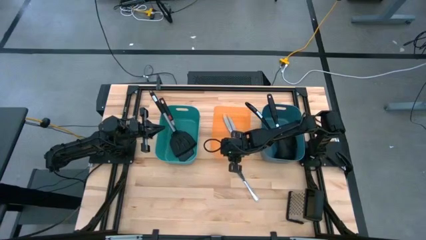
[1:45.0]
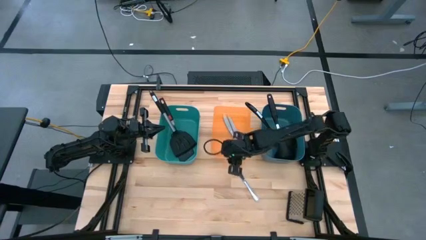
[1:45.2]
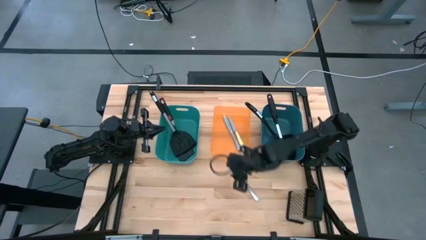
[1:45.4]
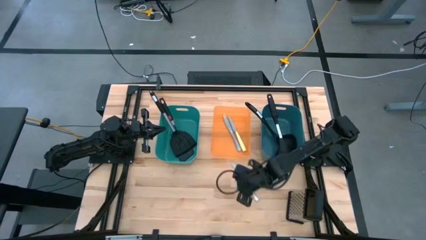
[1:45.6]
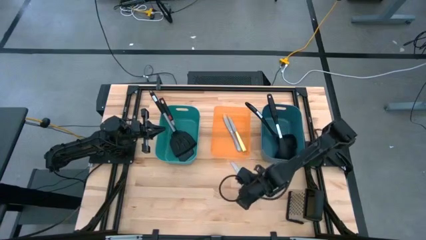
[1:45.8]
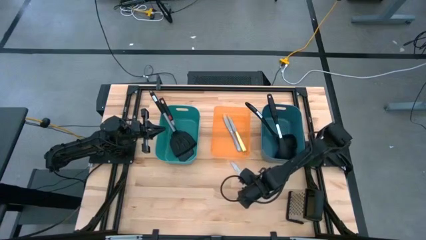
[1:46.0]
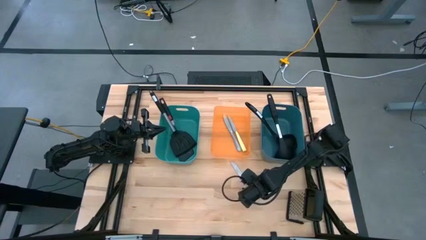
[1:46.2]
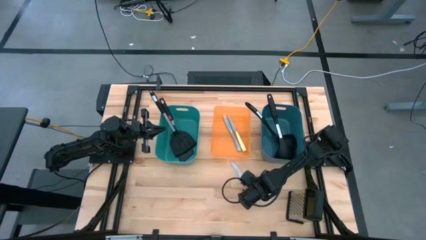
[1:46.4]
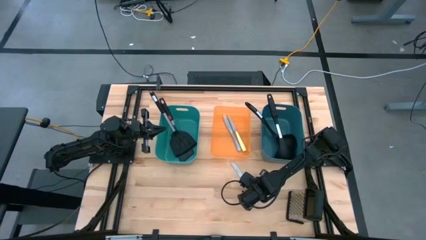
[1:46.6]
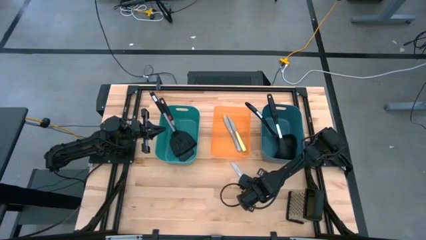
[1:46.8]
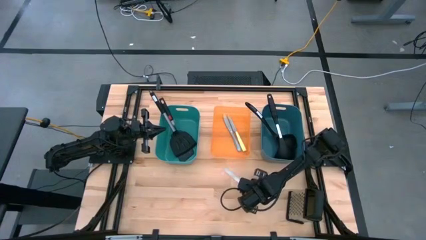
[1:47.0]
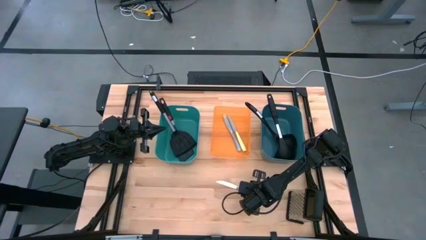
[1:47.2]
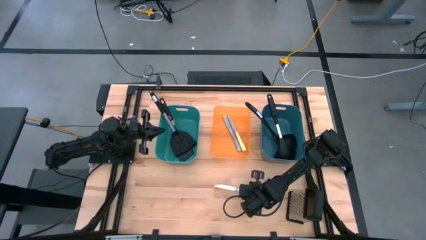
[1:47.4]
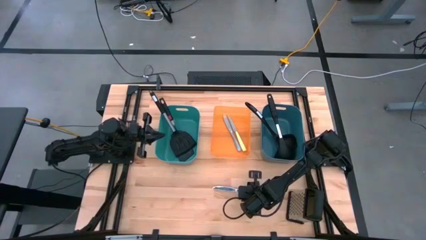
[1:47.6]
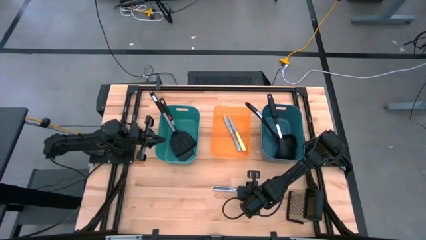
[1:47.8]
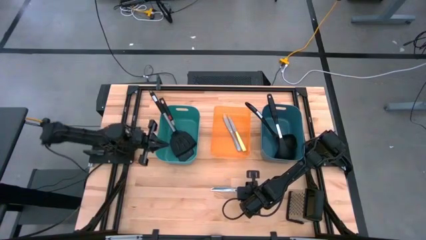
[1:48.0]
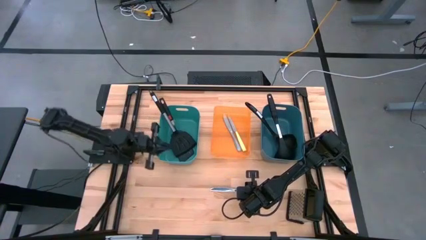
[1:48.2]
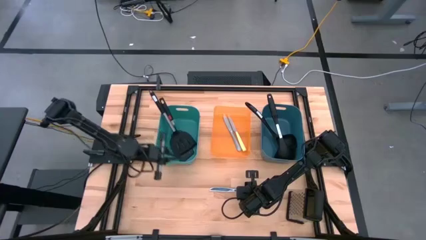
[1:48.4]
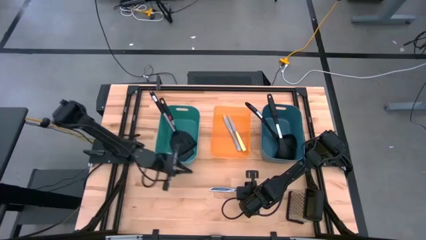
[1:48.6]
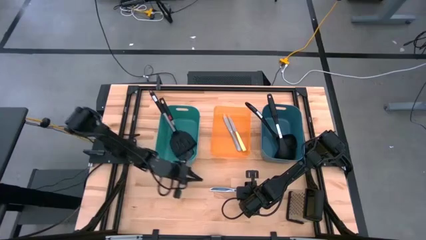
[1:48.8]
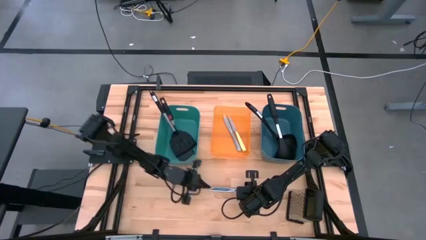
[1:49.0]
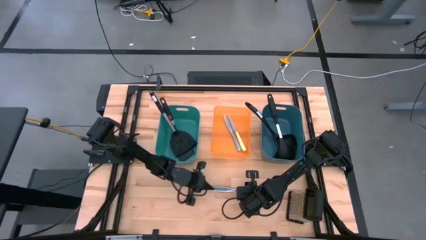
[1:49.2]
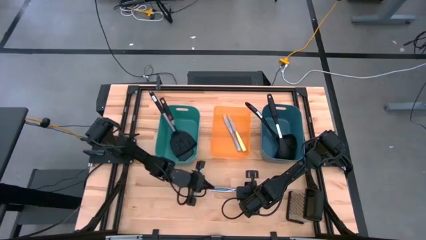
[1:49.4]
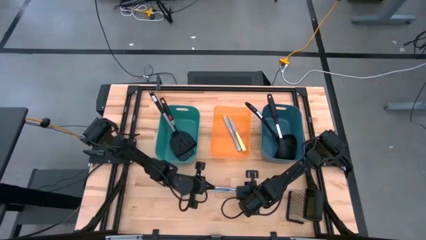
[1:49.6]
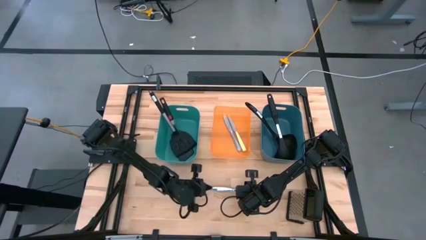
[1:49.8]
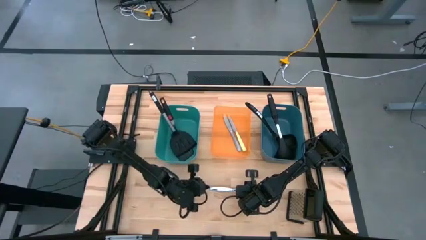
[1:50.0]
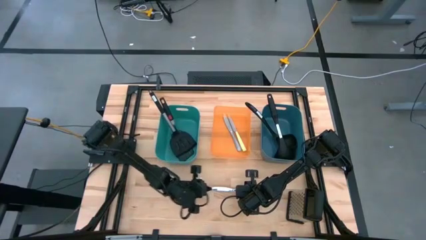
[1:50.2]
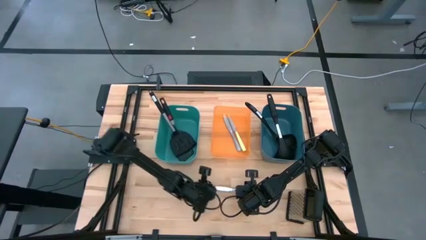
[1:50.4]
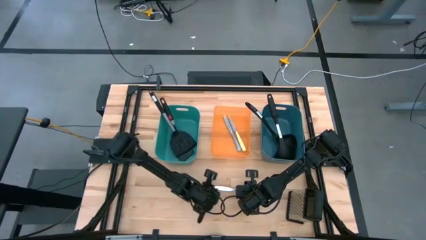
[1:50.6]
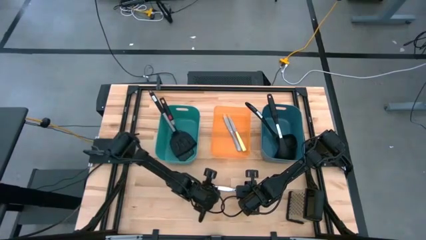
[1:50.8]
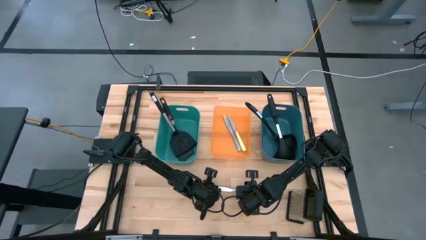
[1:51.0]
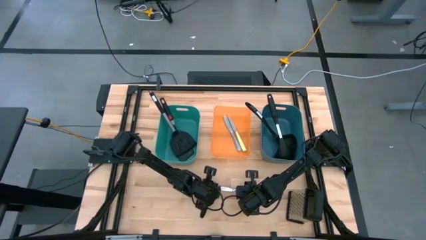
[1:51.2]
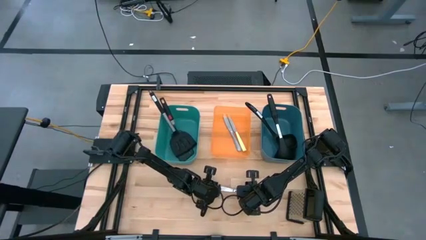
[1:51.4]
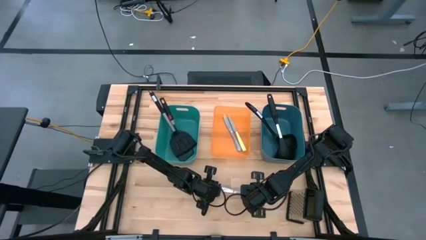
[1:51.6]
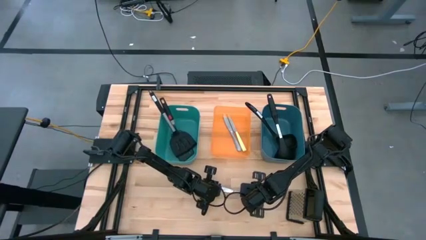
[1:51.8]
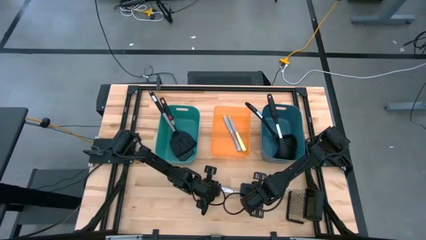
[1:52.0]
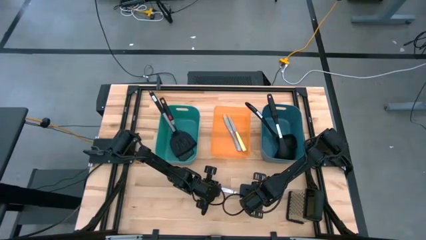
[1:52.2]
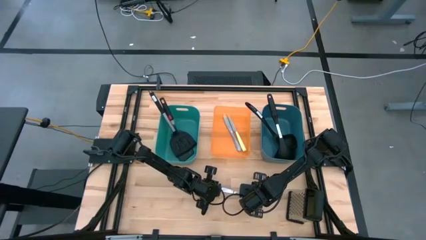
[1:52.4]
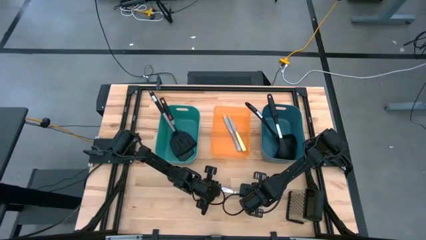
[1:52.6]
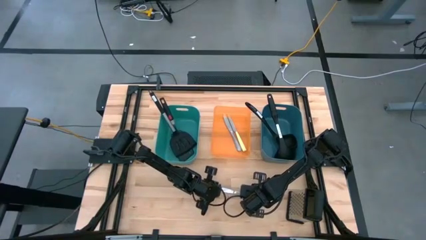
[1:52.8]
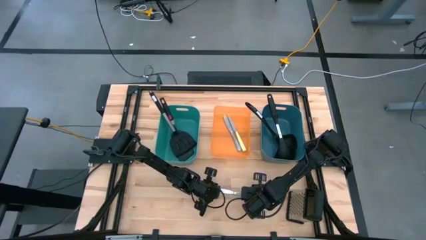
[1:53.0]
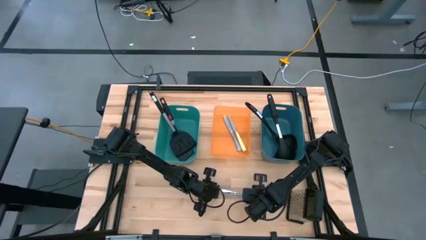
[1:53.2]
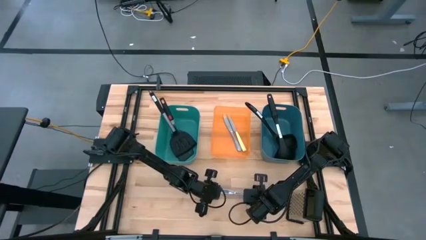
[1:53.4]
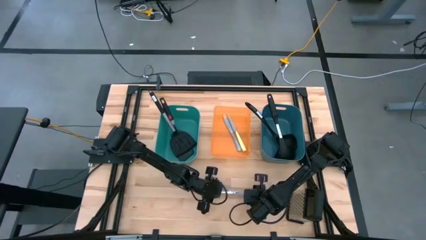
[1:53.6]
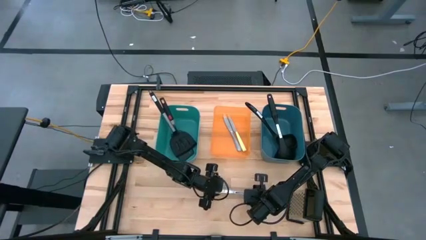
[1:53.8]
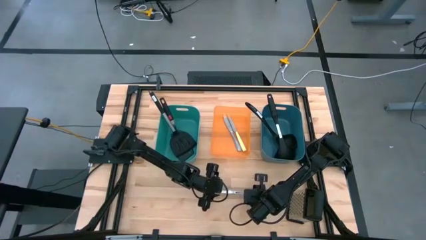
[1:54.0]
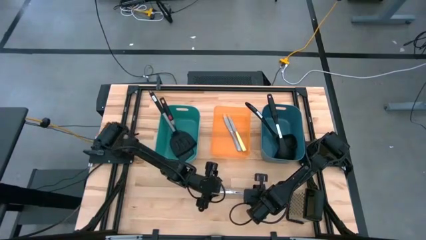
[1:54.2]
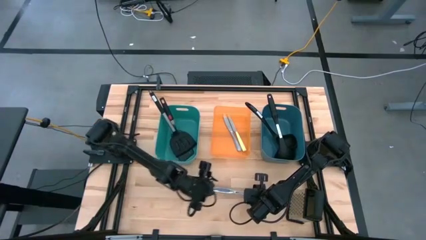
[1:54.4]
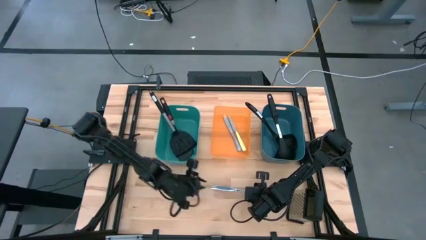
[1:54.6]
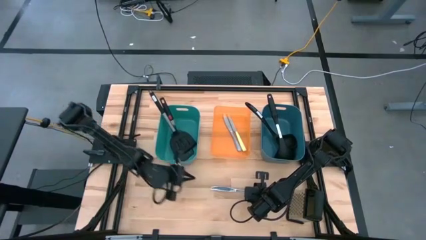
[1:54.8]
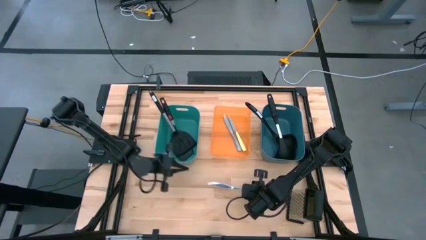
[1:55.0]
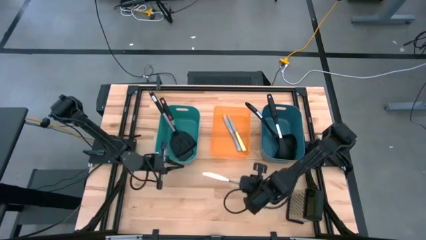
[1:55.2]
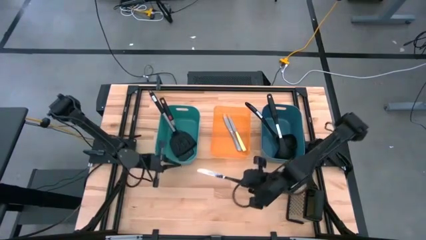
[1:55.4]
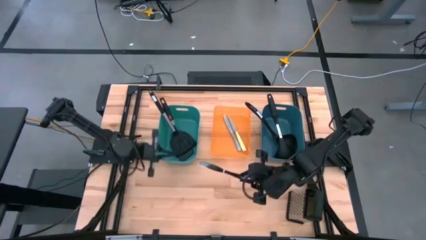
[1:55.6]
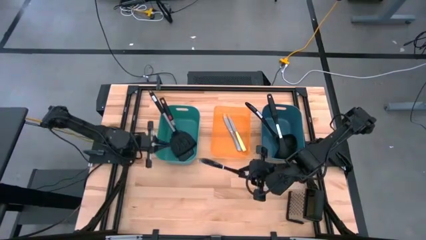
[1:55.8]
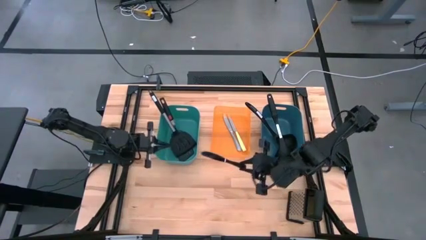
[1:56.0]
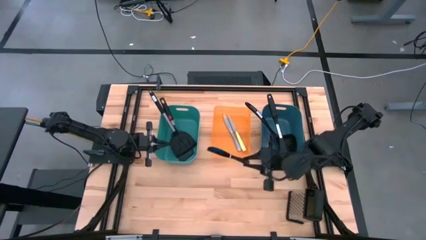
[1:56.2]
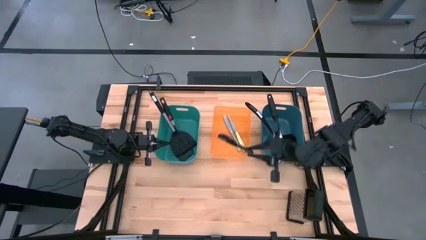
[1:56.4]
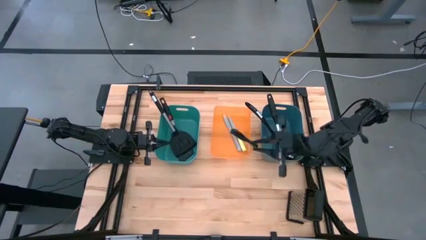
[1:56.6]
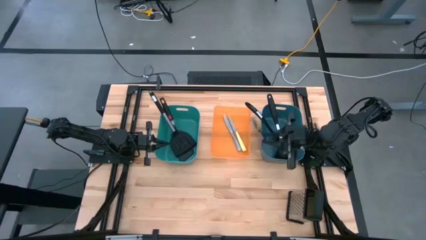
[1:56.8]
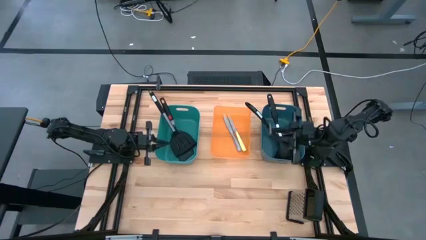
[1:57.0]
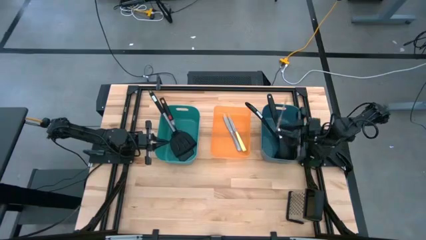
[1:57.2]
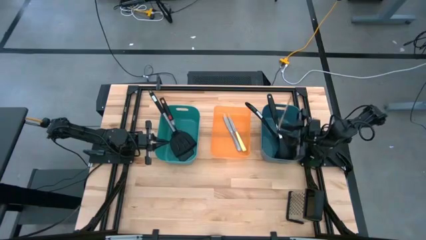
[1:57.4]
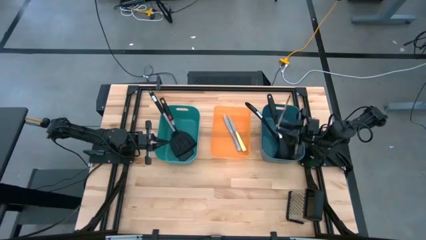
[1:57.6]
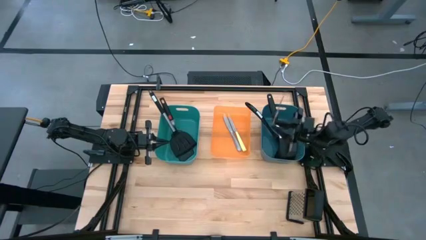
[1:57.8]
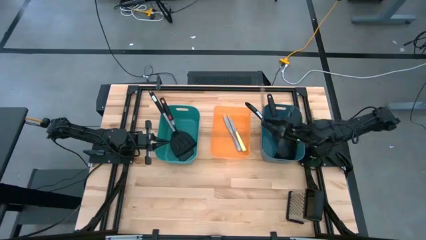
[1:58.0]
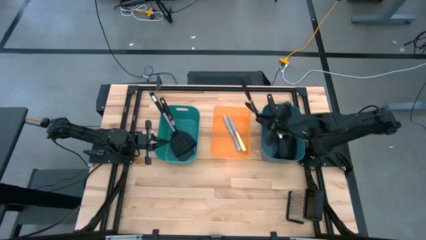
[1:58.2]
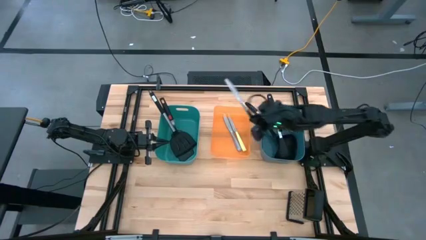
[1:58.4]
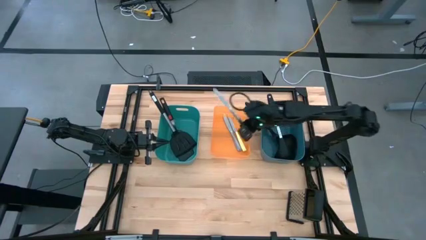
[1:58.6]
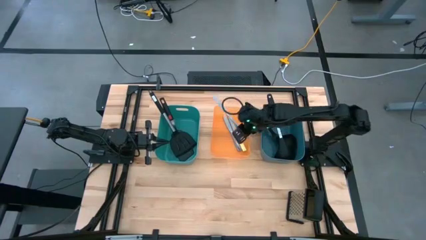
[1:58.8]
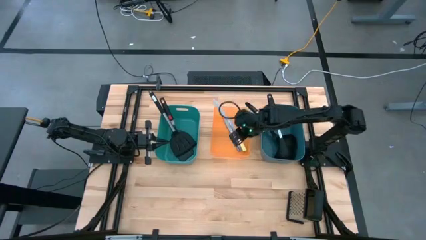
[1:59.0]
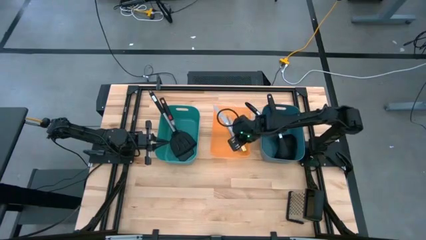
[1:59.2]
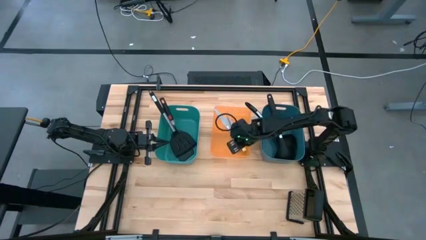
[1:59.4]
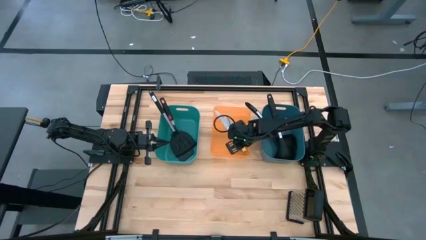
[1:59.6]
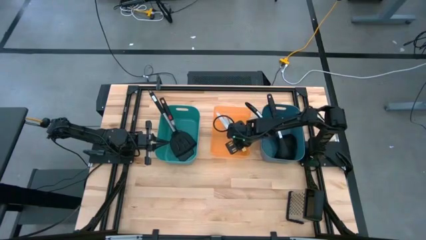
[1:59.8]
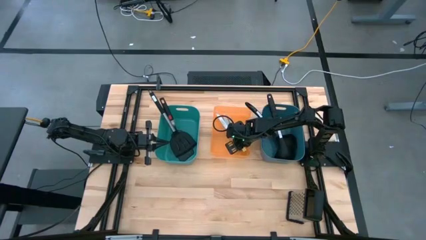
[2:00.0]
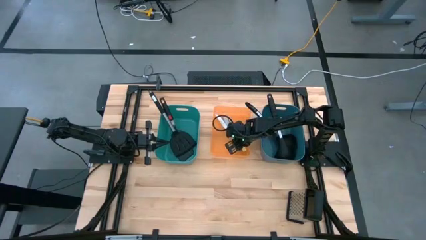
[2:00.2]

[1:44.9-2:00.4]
Task: Pick & Place Kitchen Items
Put the silver knife into the orange bin
